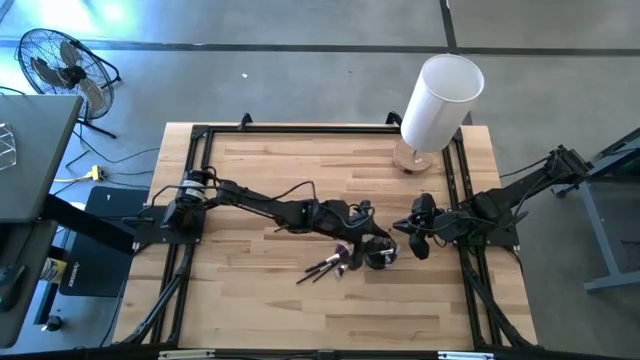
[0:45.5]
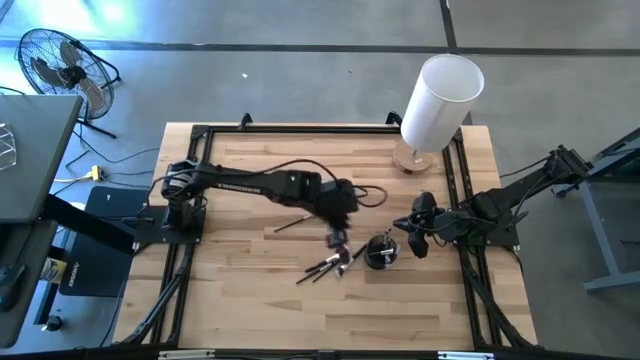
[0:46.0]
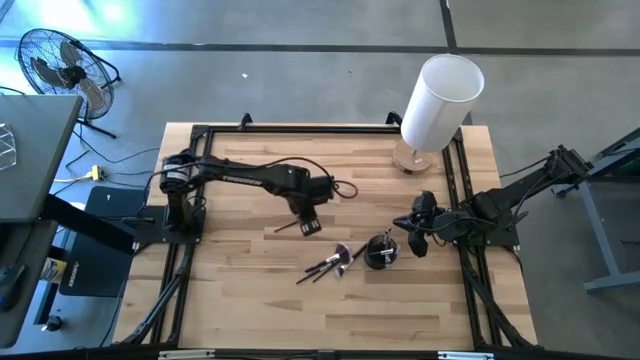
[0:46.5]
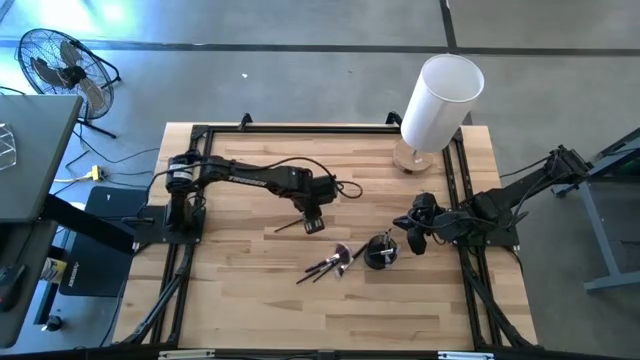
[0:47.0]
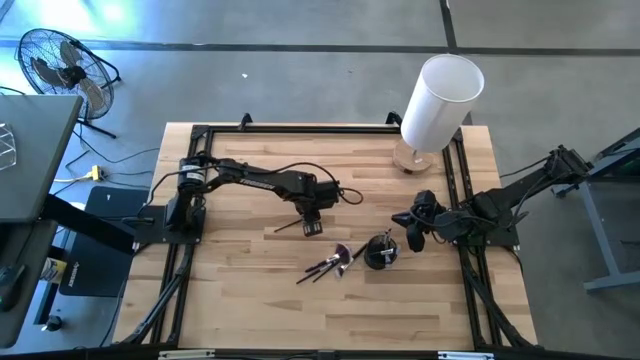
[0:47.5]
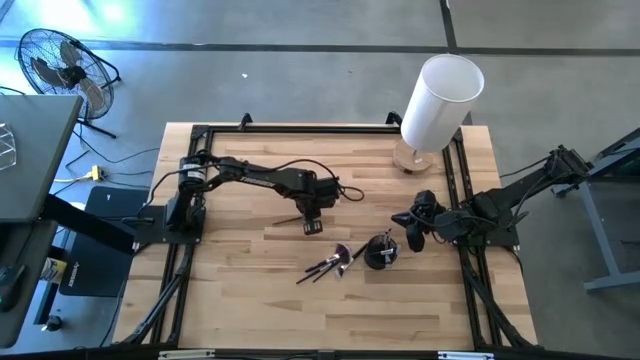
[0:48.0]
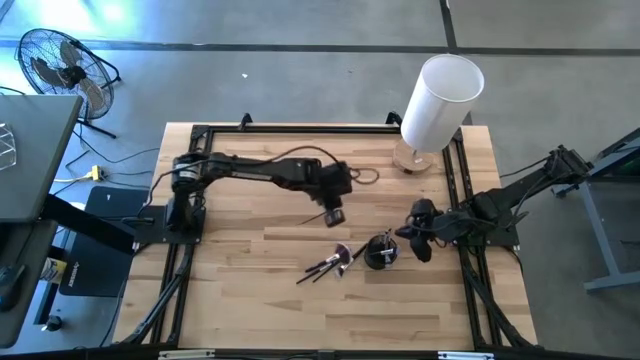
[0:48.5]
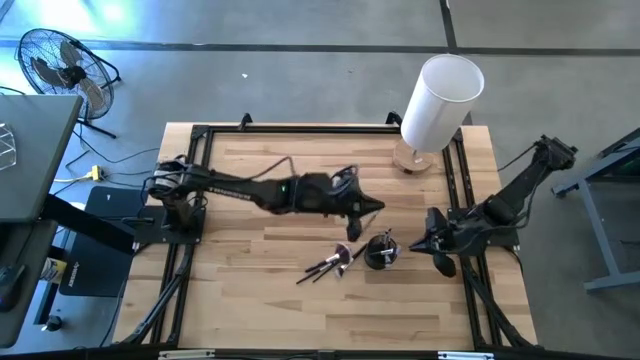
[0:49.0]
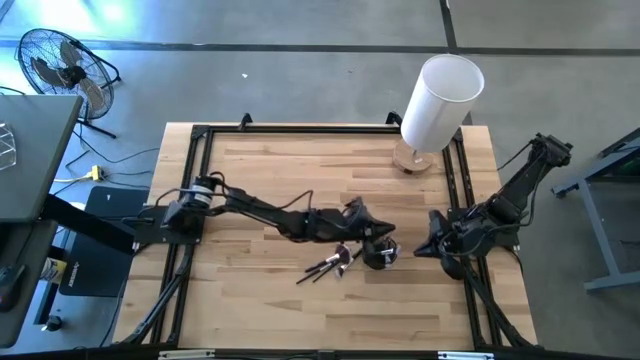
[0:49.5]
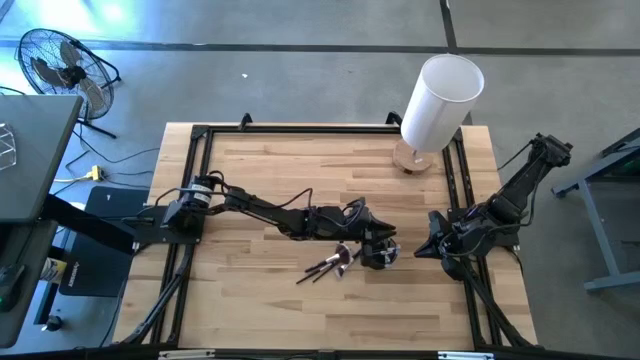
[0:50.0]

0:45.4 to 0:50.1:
Task: Put items in baskets/containers
Put the eyeshadow brush into the mesh organizer

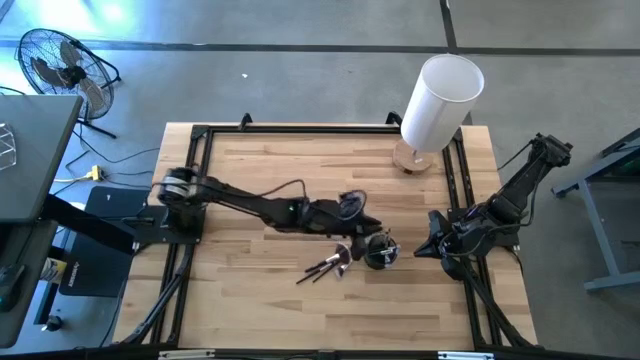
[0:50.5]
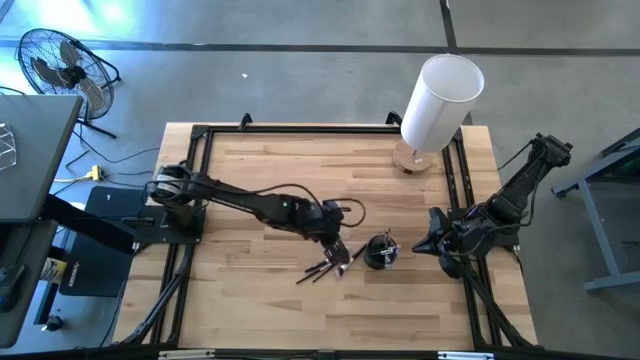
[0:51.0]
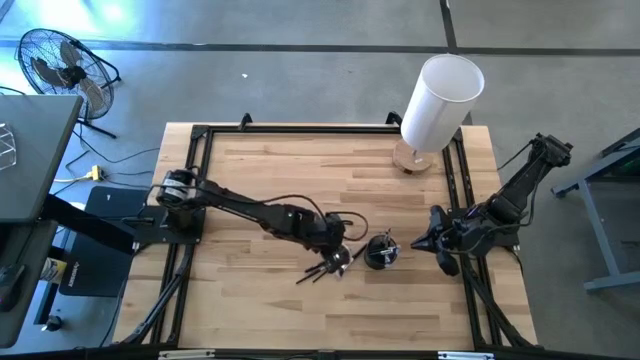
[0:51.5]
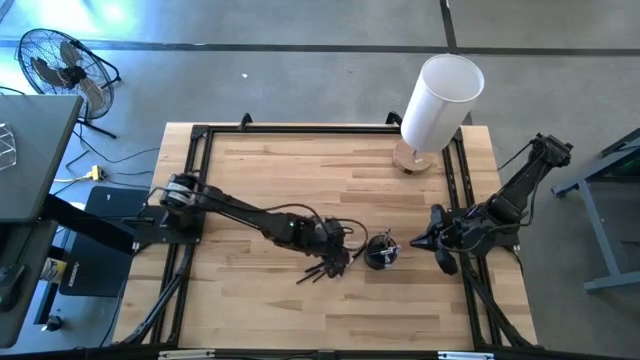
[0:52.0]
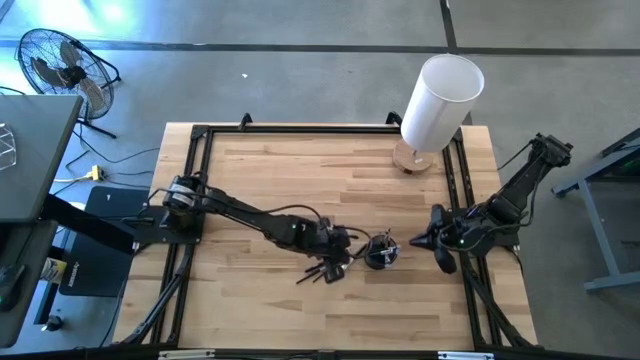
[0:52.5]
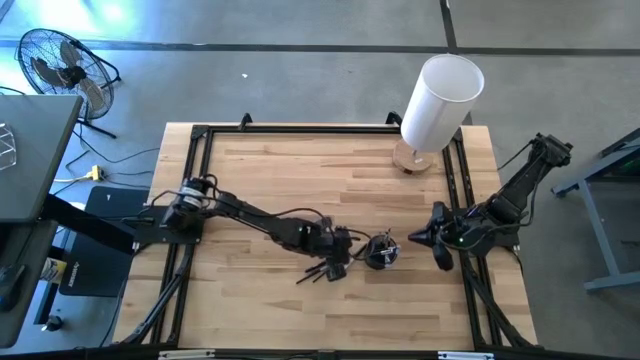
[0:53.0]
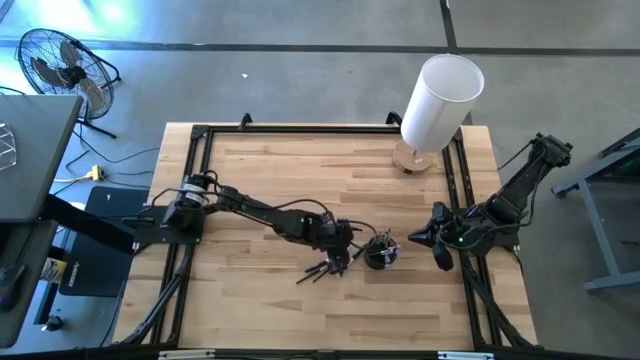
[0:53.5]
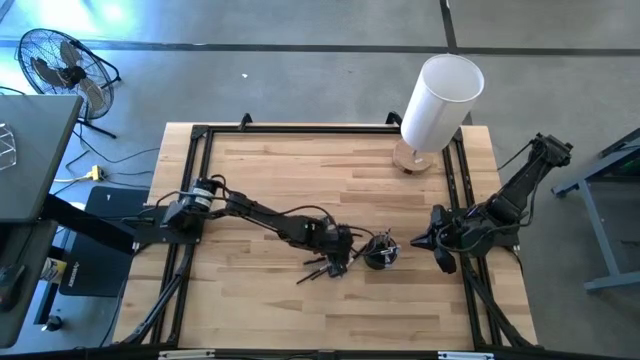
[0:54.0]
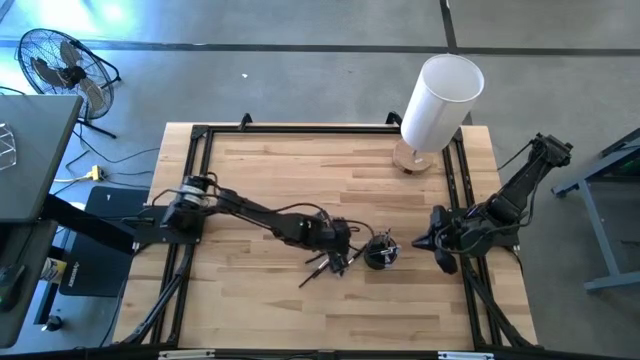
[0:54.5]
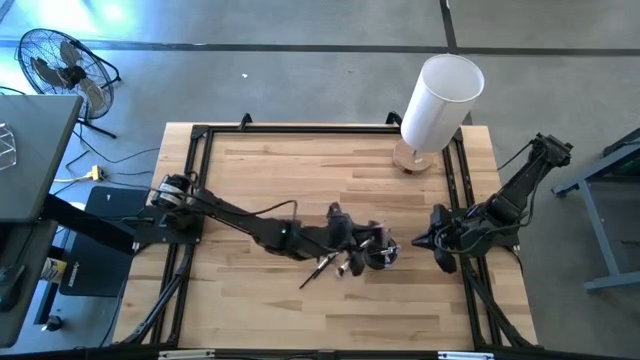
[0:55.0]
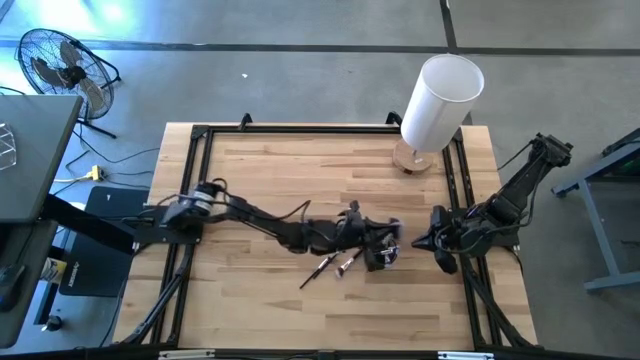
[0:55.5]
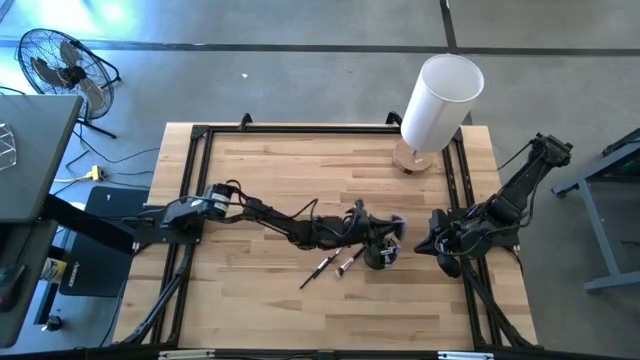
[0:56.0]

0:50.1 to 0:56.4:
Put the highlighter brush into the mesh organizer

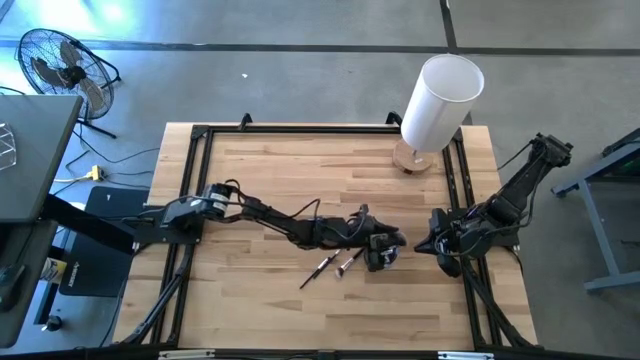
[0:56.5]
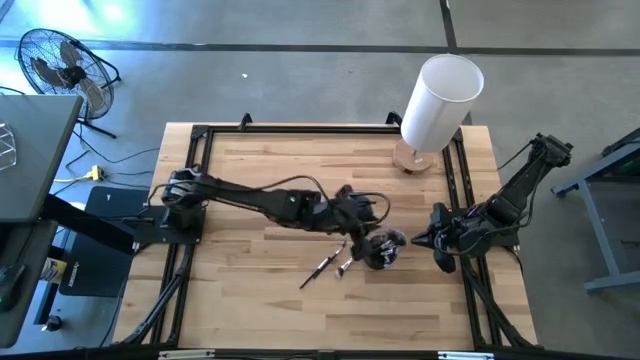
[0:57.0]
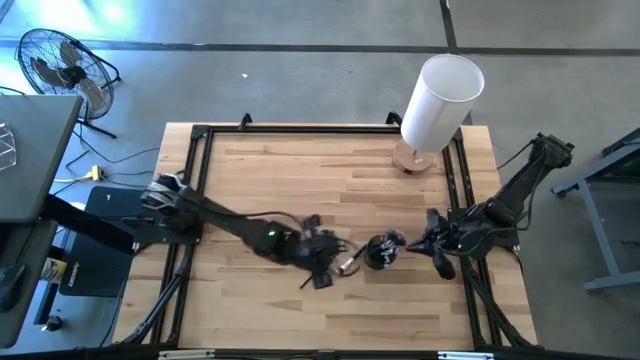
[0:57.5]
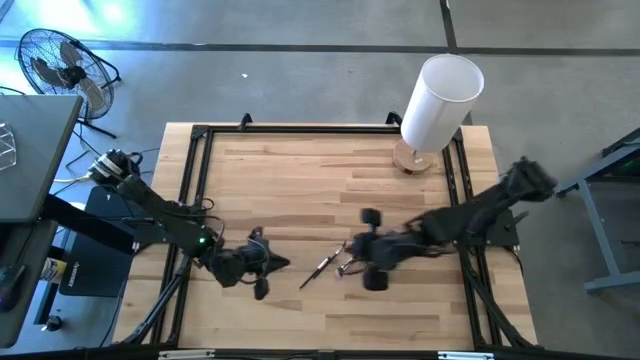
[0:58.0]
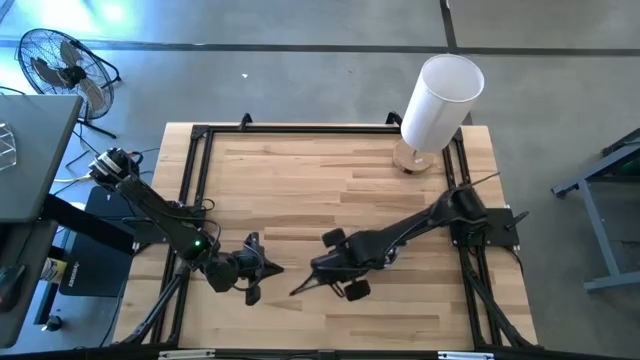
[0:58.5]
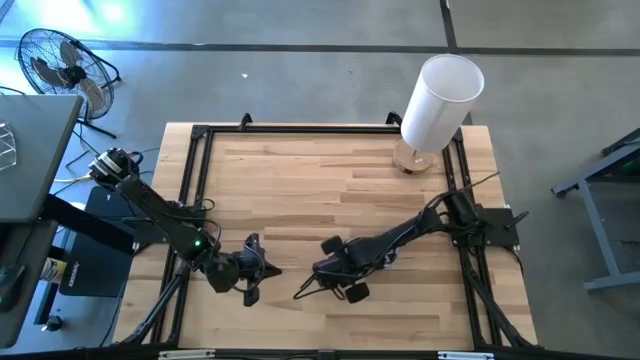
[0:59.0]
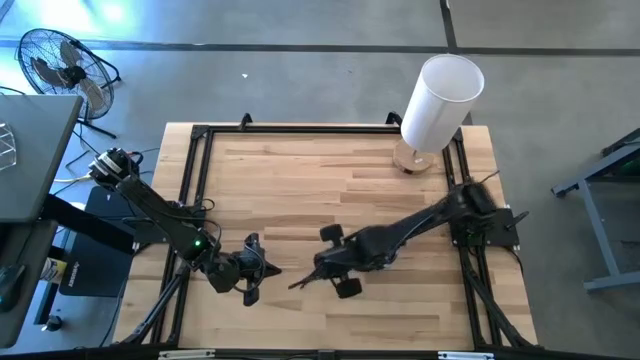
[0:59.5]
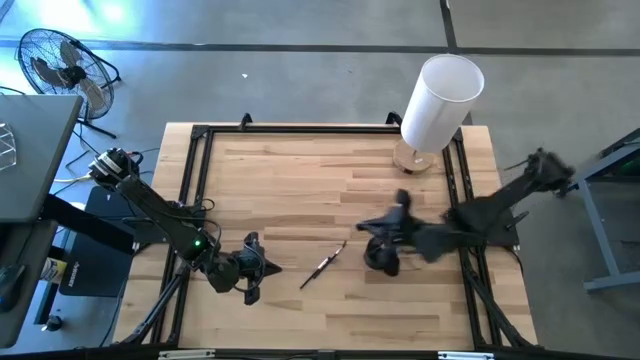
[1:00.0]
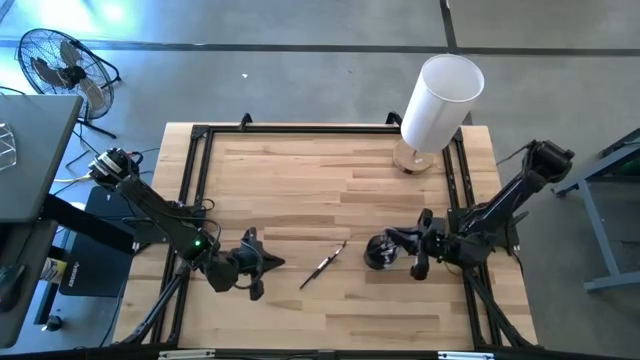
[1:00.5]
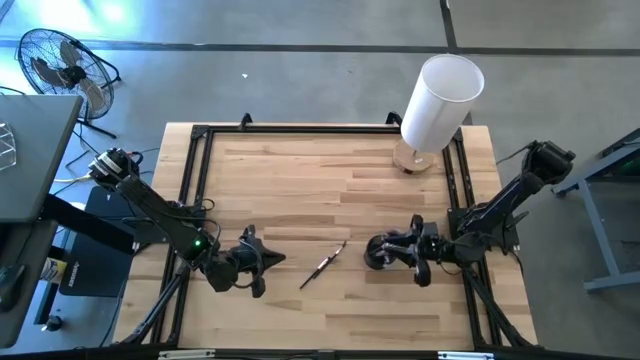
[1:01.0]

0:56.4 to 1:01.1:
Put the powder brush into the mesh organizer

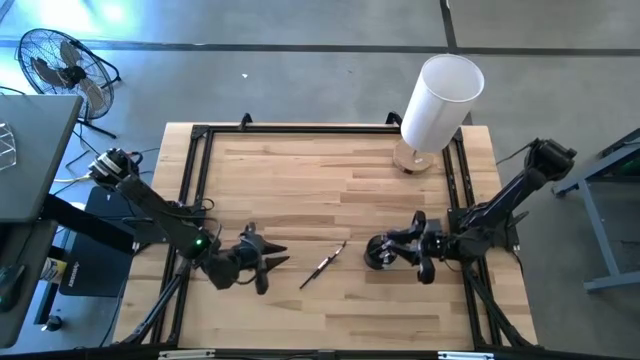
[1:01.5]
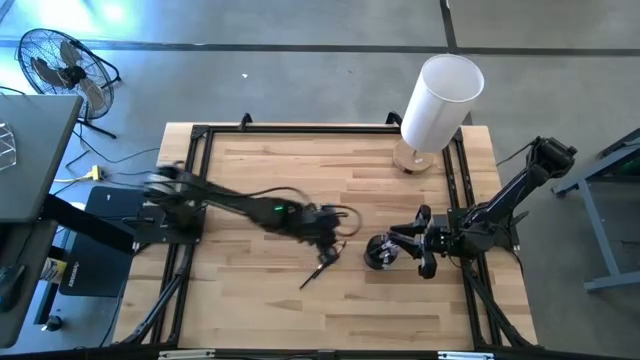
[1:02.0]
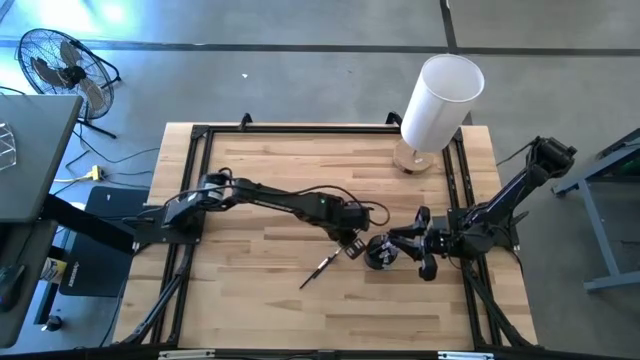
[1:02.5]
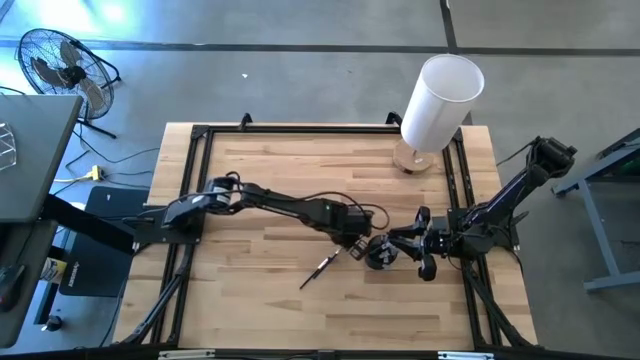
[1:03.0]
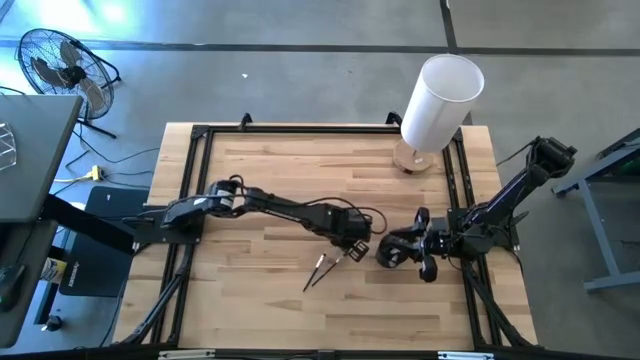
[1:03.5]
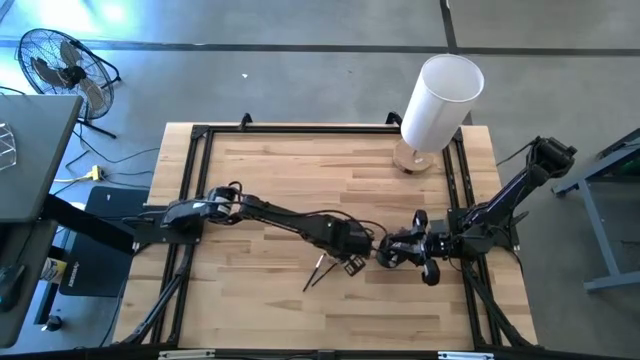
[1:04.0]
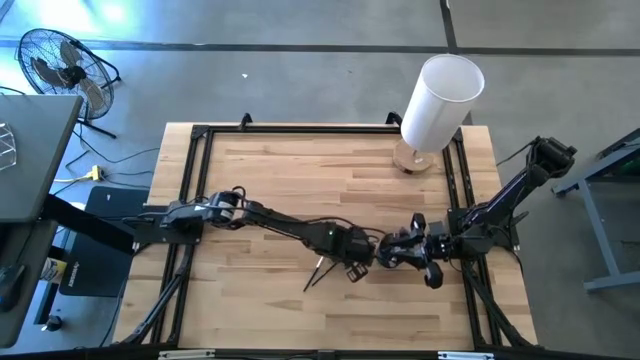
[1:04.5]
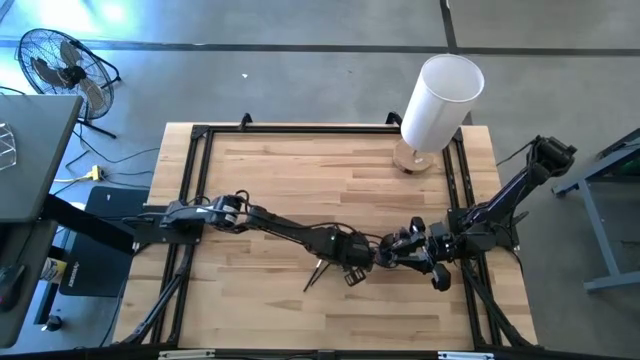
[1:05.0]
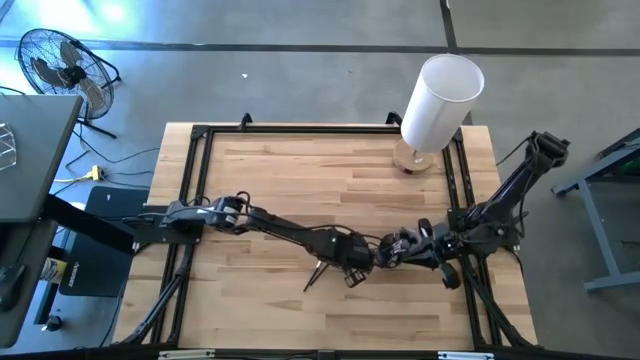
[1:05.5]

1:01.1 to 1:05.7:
Put the lash into the mesh organizer
